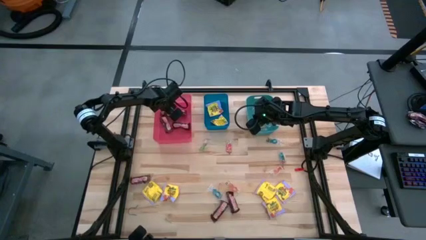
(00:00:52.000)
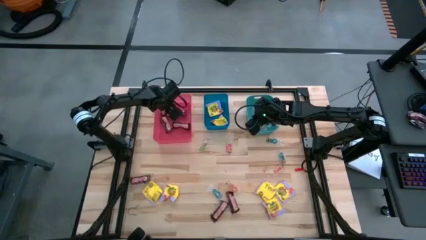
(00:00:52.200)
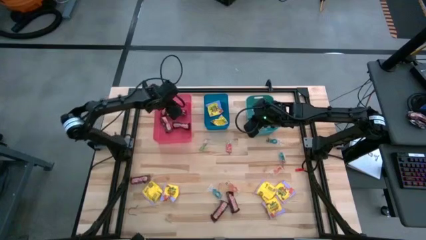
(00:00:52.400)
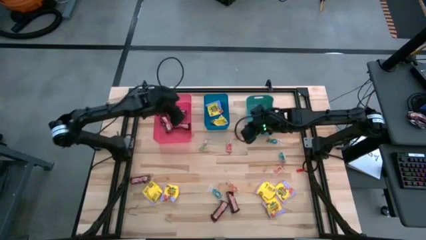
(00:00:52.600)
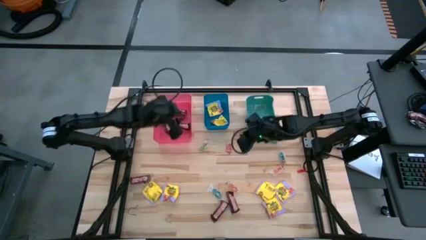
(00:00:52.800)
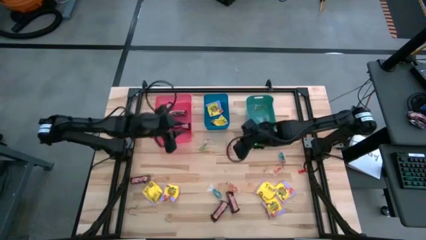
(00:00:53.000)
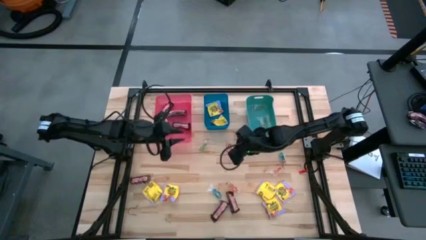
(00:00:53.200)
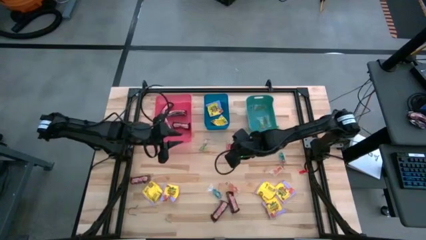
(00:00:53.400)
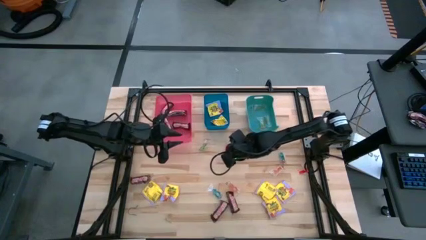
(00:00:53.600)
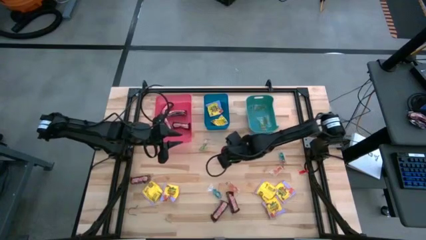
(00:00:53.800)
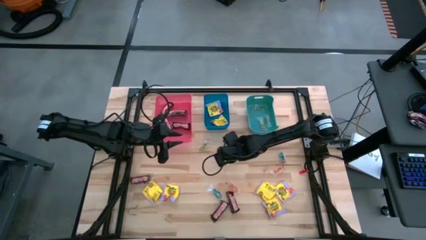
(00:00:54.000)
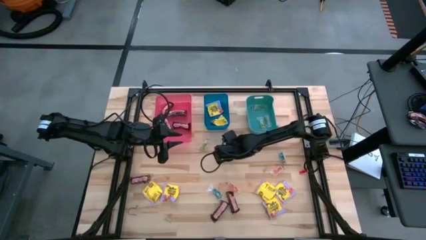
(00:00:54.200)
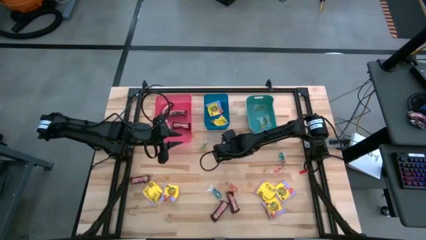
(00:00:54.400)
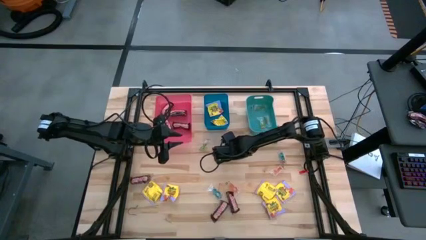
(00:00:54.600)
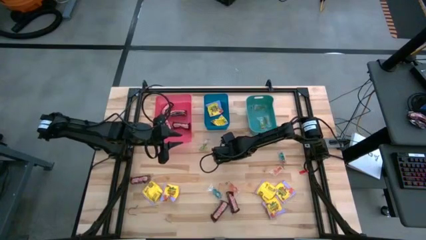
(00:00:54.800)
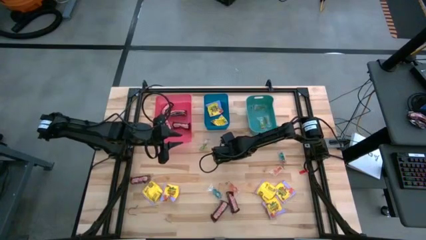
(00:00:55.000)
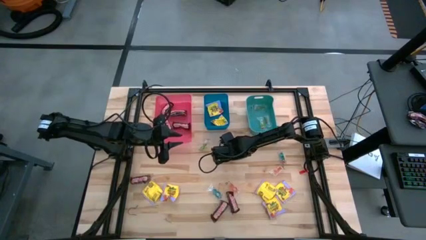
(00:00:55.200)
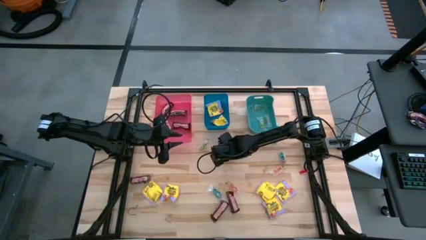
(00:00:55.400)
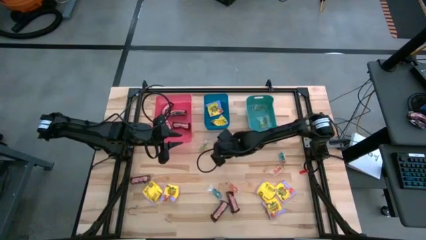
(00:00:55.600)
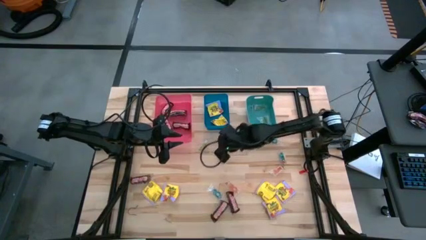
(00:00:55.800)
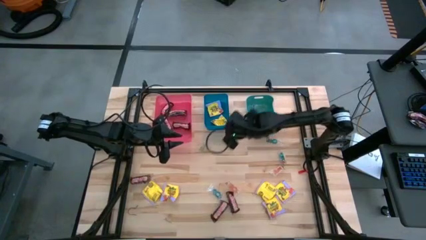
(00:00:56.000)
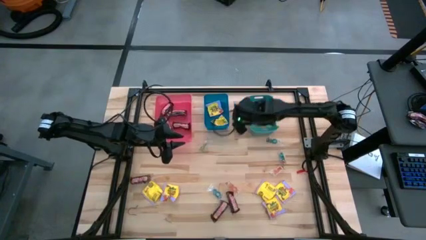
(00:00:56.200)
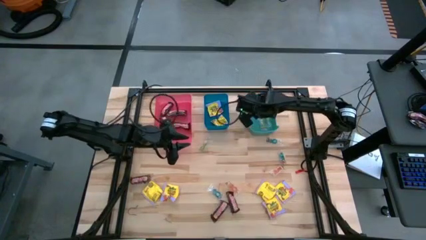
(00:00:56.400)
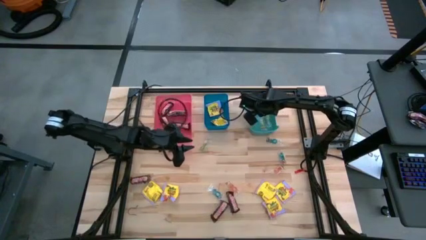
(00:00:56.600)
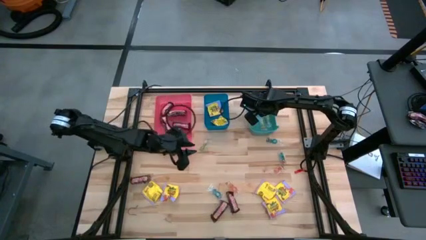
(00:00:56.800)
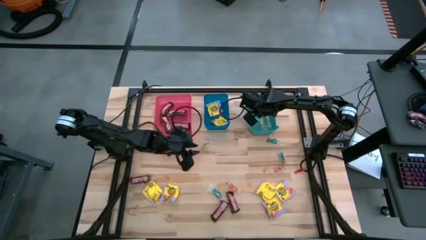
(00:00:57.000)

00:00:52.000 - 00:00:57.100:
Task: Sort candy
Put the orange gummy candy into the green bin

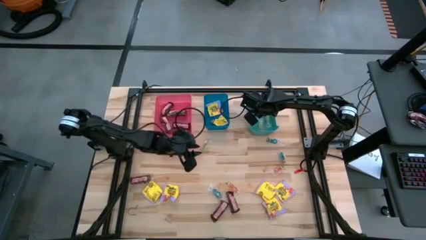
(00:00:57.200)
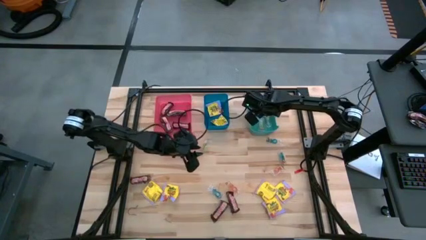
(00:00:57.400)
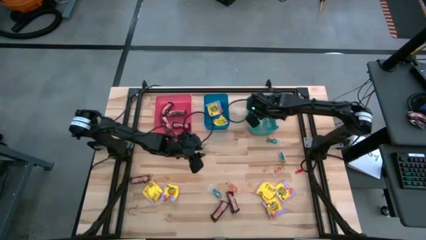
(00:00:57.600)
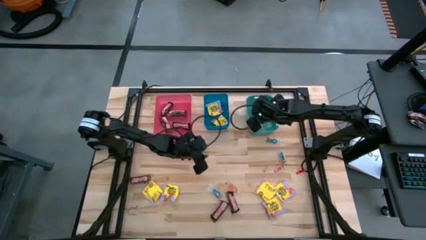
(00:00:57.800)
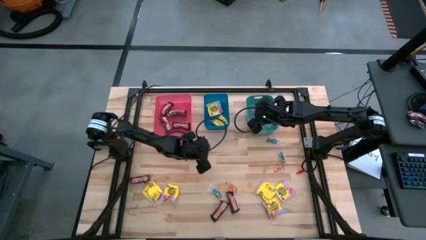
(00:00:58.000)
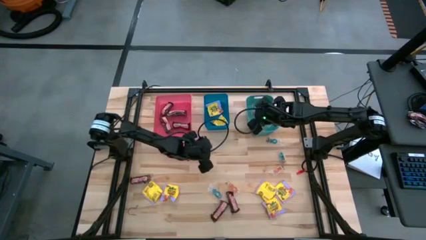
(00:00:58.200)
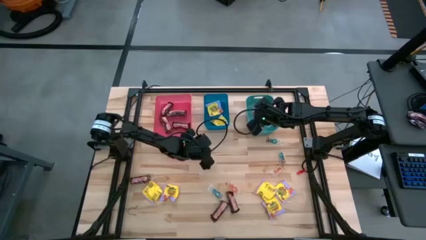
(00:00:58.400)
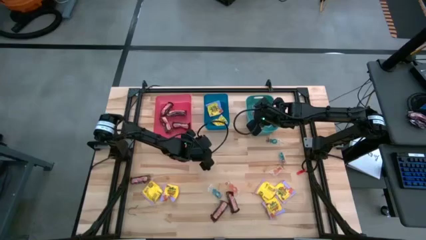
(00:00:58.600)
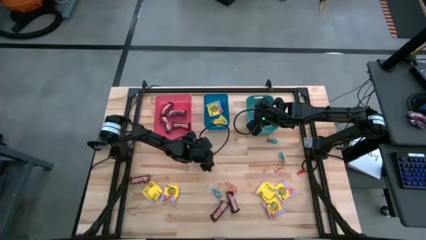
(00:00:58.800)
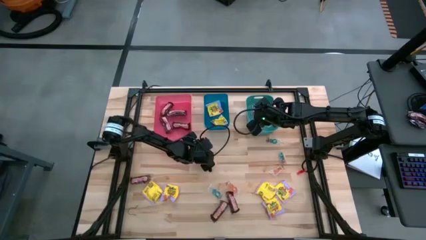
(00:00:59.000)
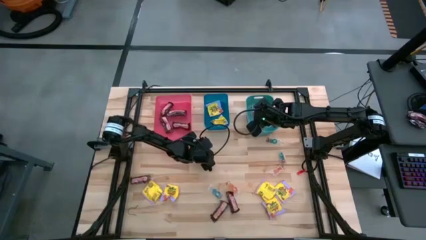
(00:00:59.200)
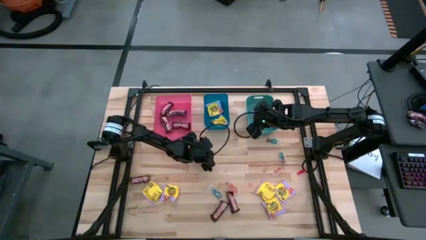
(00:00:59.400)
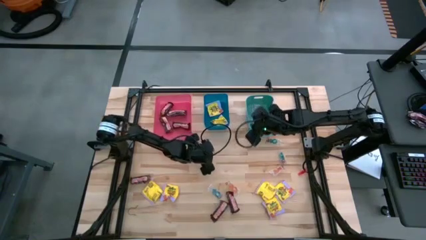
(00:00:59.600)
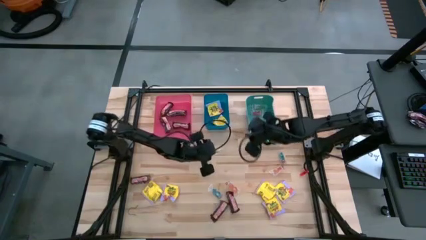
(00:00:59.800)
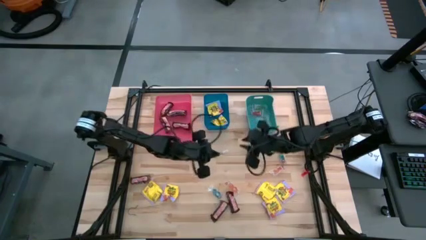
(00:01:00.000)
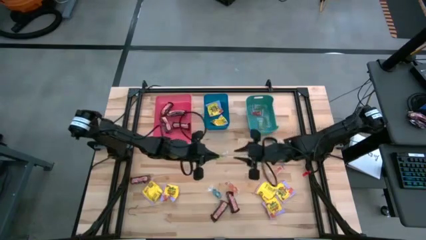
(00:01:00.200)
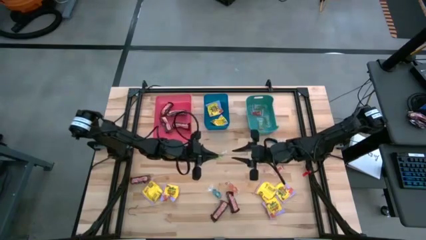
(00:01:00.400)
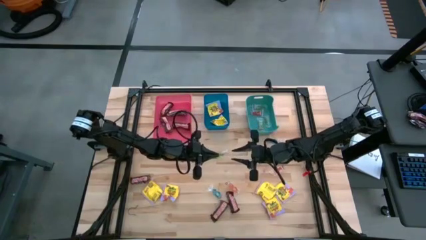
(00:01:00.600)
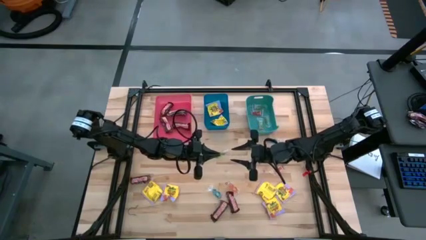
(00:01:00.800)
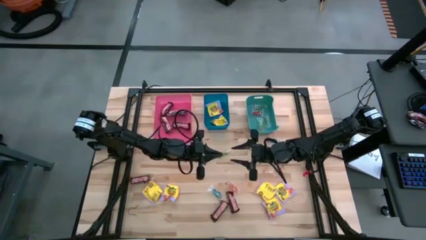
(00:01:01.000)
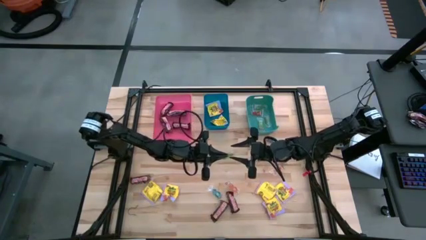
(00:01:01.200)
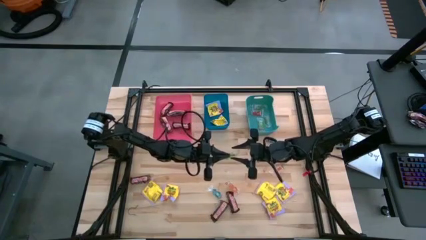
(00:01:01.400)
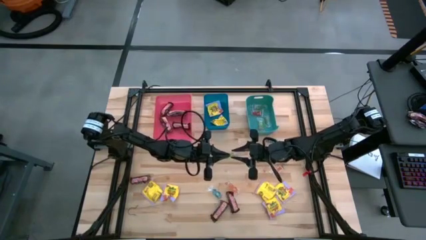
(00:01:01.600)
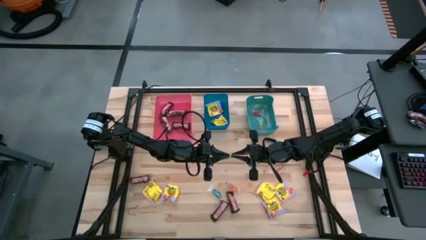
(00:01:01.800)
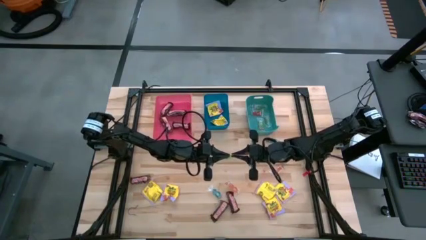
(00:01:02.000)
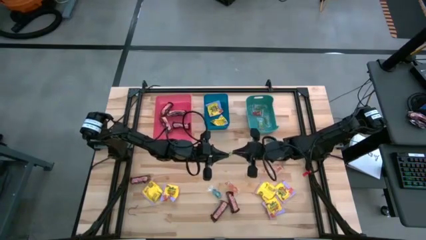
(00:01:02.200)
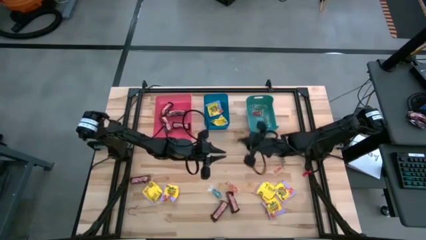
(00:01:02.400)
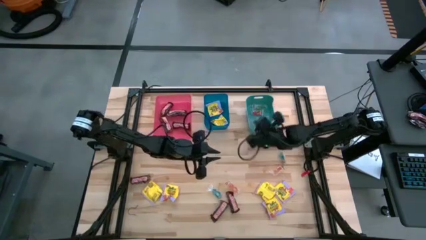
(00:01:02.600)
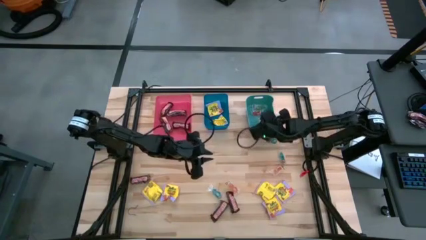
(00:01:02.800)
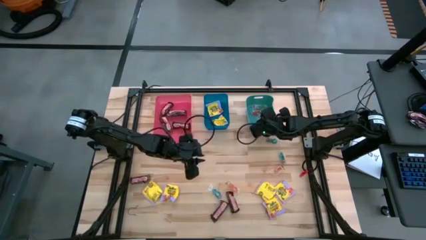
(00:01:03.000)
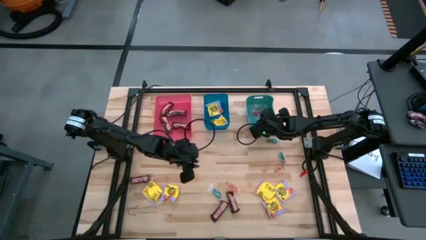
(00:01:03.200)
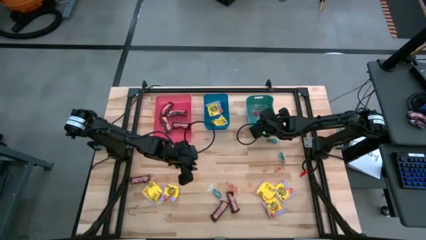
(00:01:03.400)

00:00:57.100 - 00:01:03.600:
Put the green gummy candy into the green bin

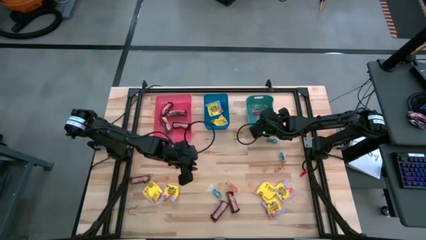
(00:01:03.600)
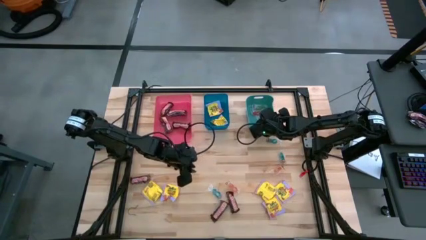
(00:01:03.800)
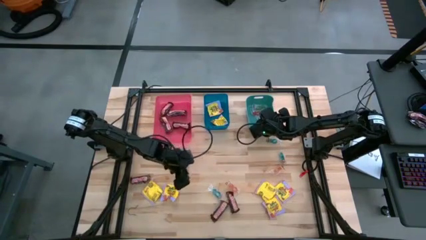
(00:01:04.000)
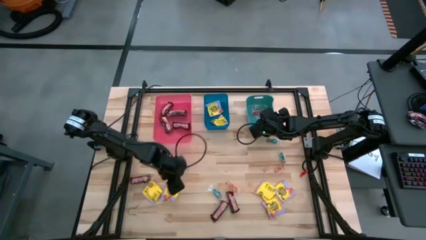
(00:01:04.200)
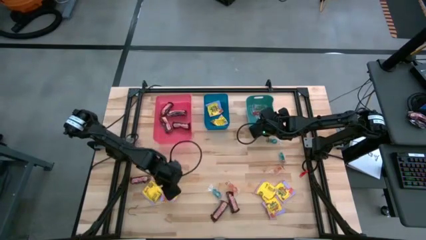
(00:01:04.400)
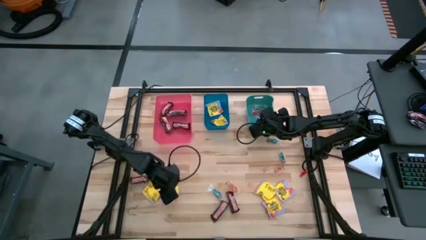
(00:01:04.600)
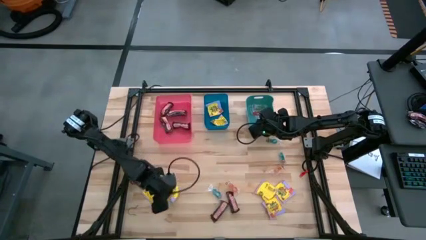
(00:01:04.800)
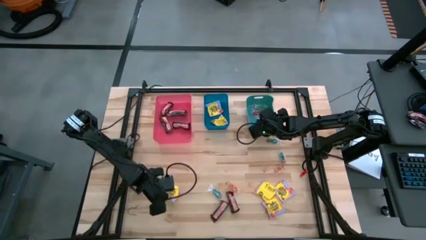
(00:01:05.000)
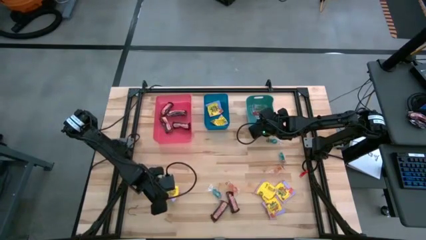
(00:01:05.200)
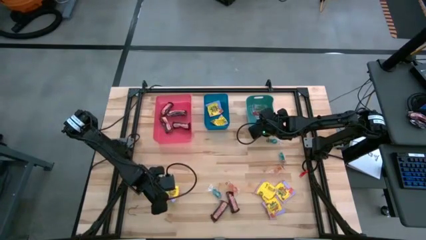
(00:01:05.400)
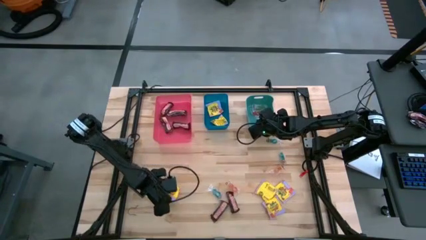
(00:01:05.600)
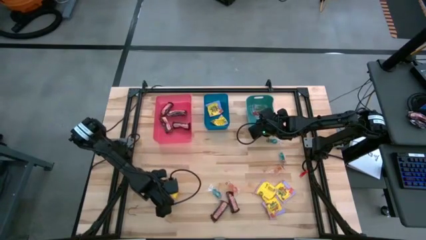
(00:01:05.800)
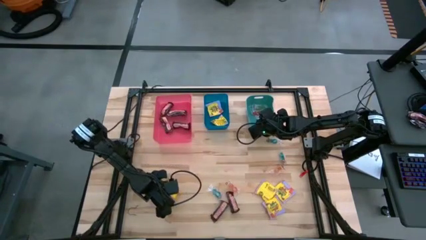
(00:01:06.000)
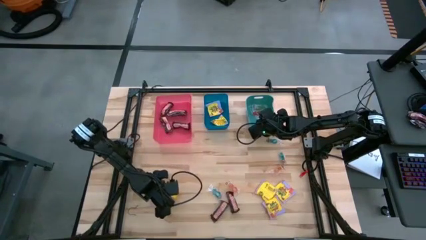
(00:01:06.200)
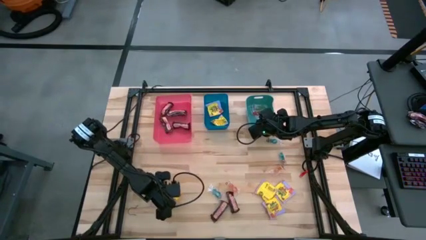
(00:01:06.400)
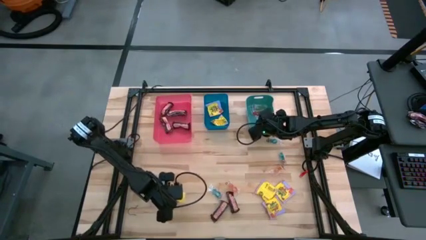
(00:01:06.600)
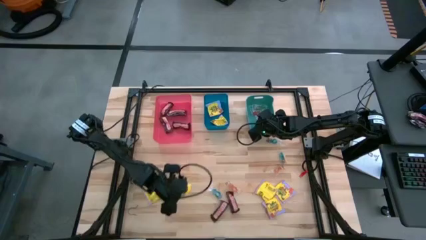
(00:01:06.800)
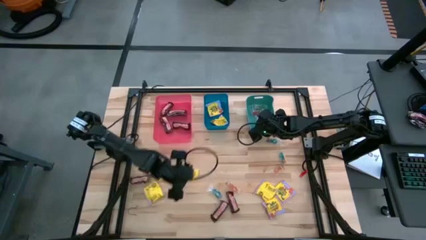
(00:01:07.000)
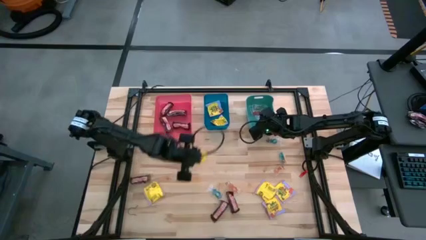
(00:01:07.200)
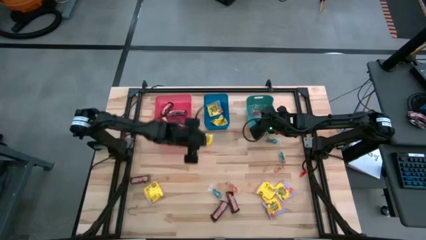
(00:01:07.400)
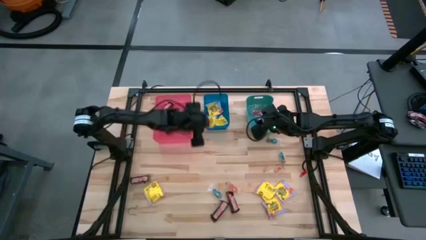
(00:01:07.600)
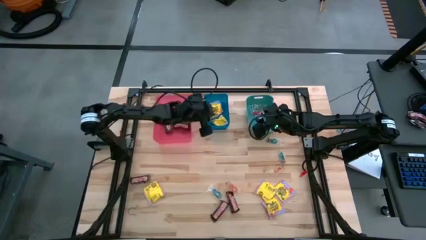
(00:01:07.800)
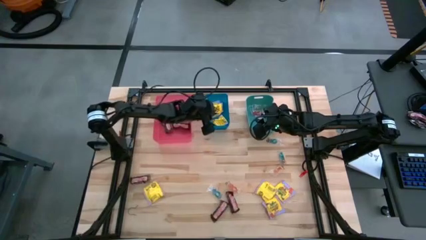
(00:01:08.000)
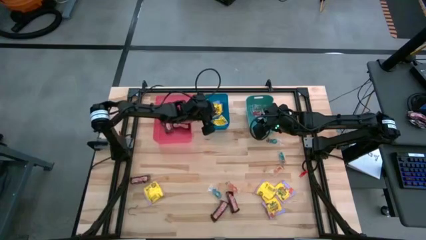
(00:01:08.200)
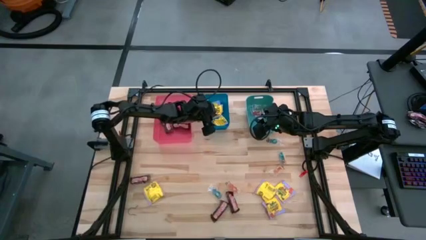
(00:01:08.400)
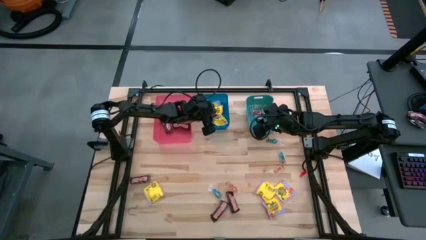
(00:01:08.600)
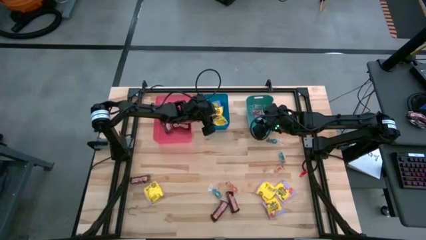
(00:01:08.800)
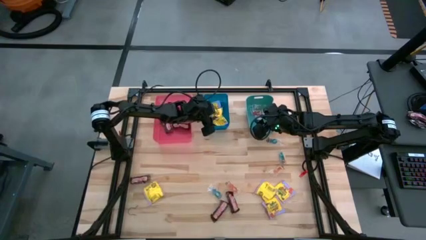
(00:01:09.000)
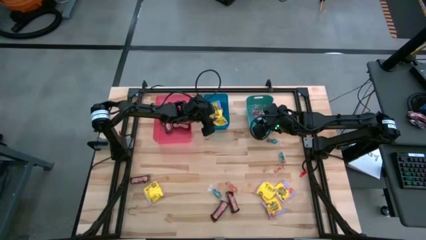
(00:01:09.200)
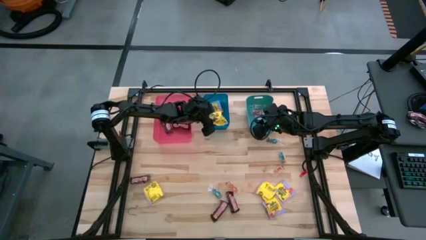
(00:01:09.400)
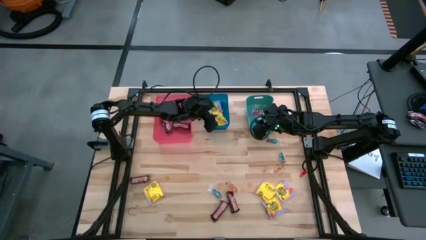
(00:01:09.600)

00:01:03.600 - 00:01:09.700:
Put the yellow candy into the blue bin
